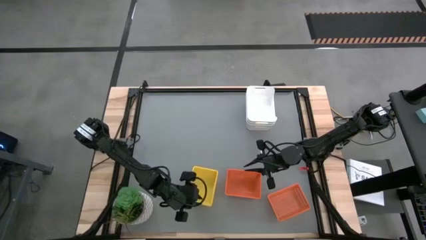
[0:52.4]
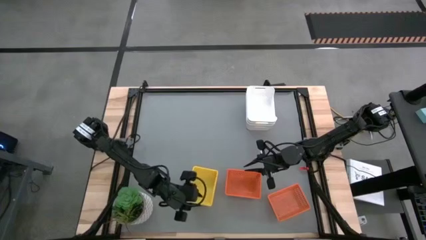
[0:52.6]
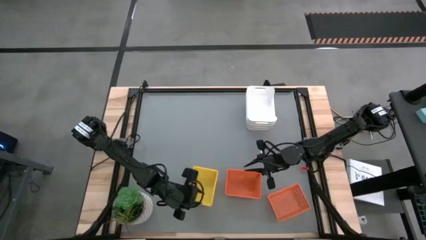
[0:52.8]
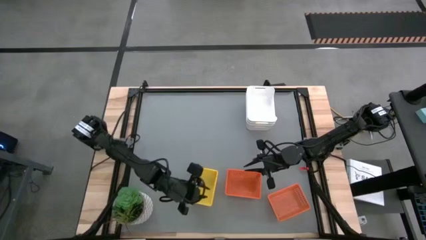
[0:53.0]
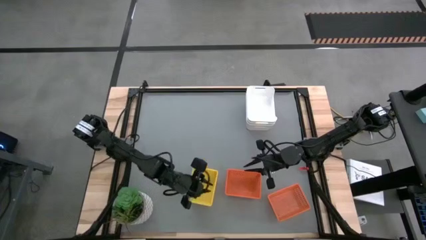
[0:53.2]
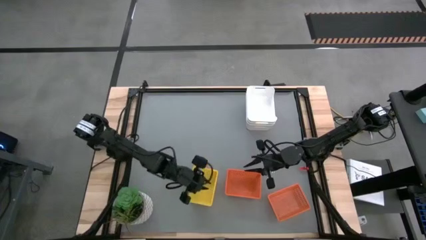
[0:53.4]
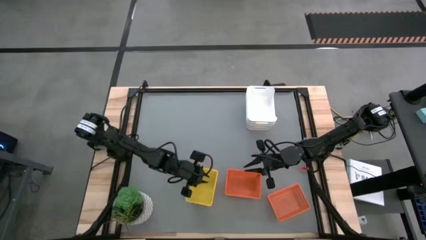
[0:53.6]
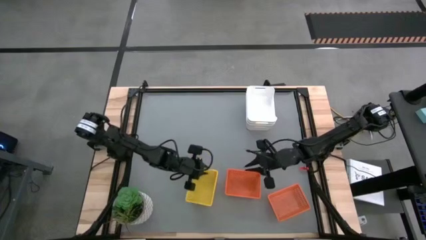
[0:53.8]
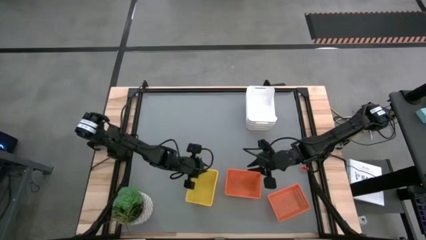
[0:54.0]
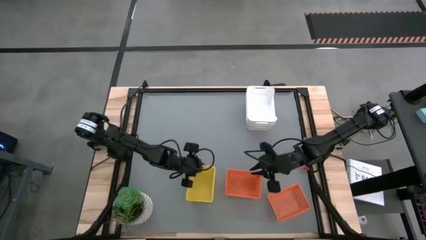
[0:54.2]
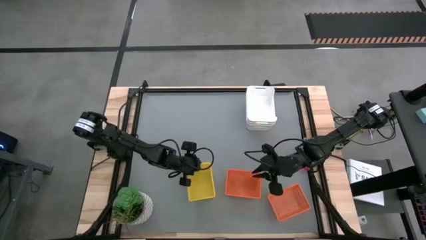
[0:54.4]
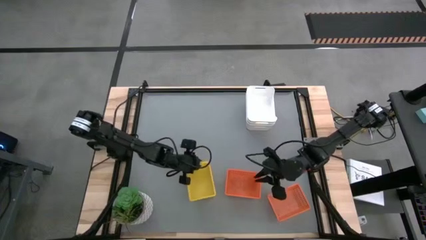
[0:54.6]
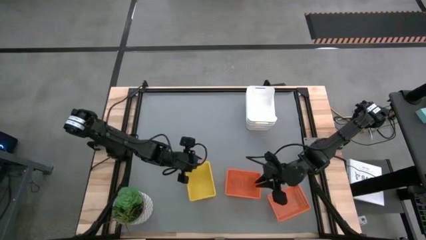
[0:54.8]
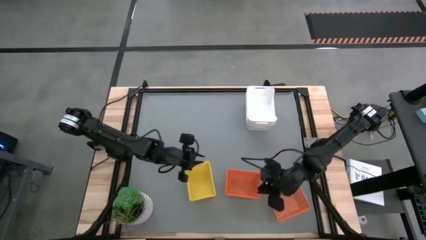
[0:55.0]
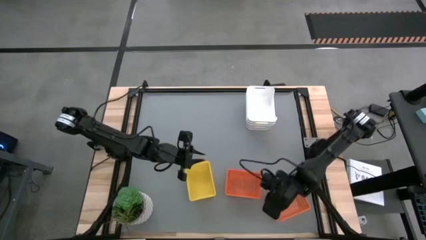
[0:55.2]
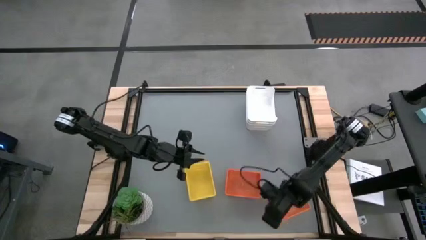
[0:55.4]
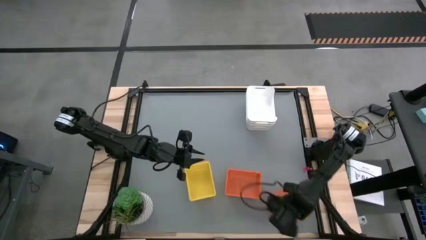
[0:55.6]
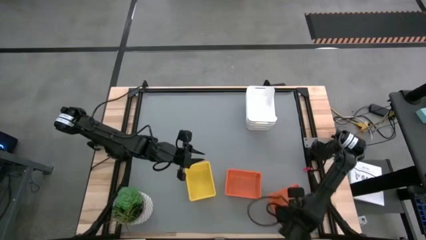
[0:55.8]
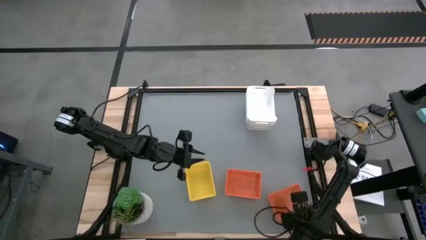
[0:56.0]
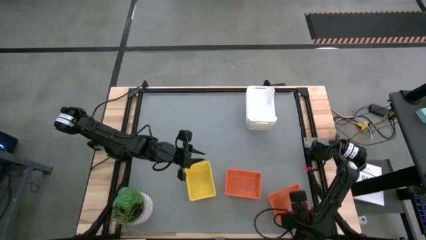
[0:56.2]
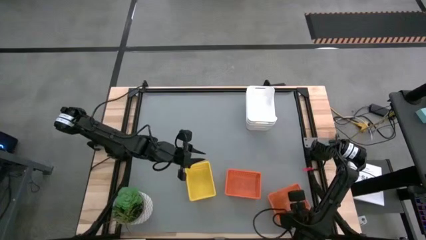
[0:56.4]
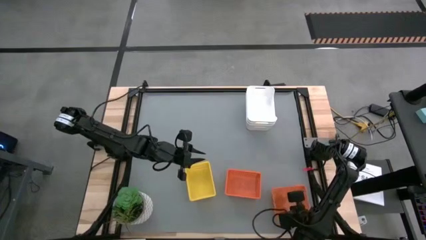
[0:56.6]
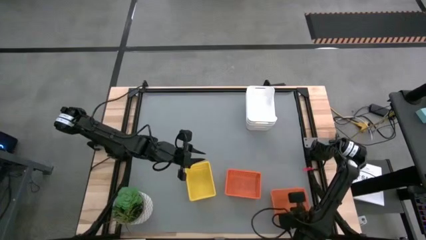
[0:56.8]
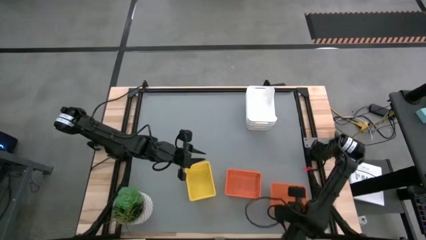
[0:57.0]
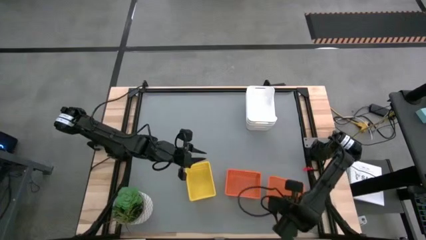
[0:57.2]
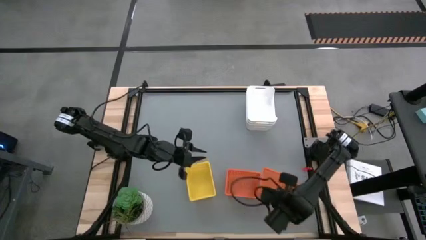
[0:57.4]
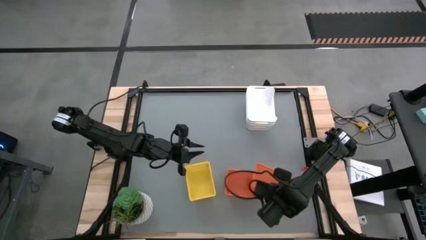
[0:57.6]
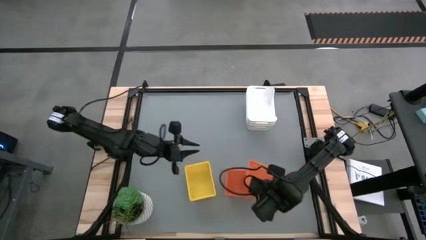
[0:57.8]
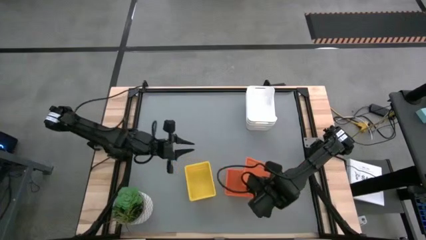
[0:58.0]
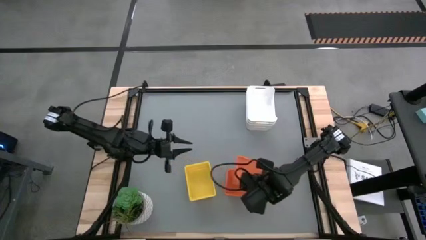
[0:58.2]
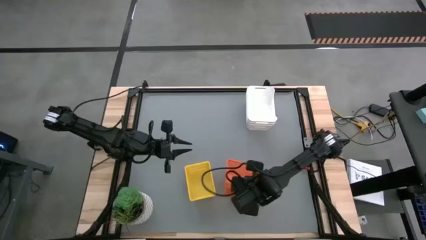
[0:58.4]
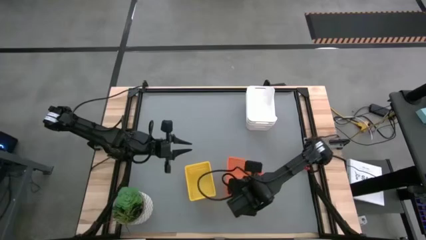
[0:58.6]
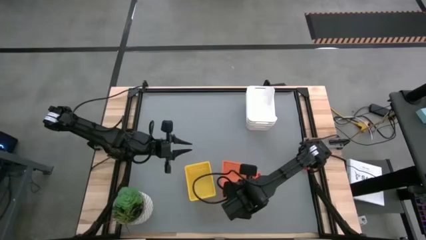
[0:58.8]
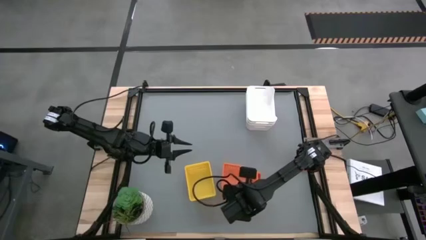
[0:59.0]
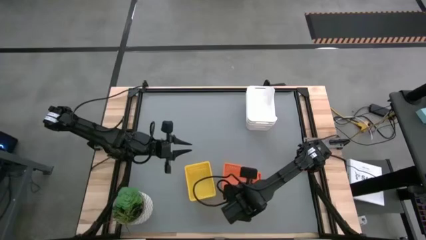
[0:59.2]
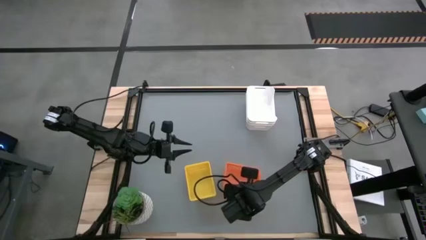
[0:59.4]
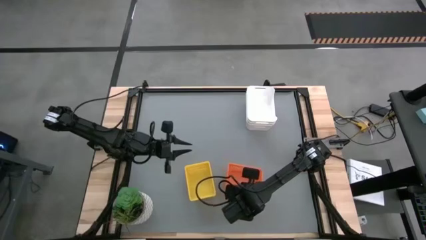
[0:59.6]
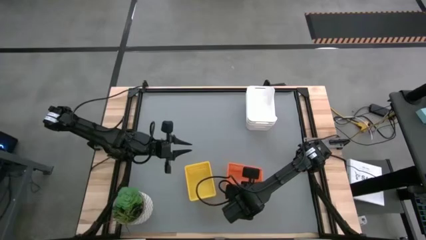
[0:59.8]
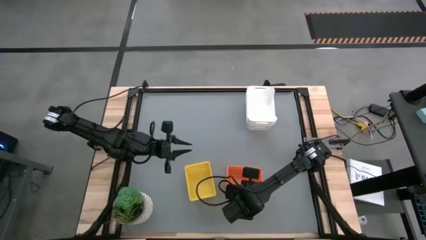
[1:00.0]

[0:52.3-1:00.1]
Stack the right orange bin on top of the left orange bin

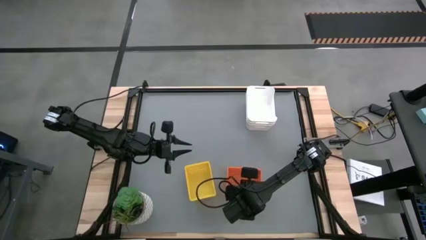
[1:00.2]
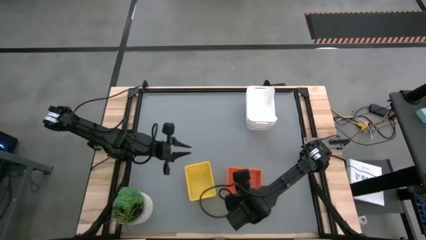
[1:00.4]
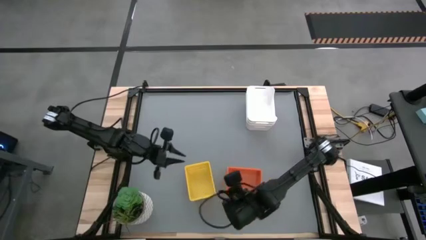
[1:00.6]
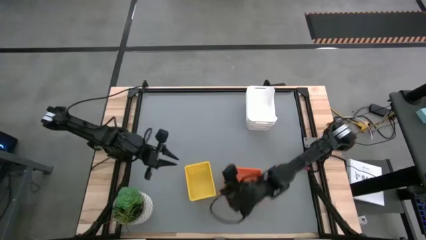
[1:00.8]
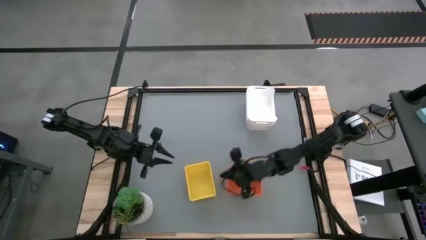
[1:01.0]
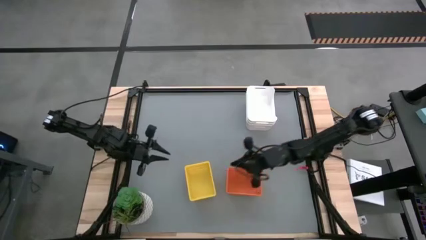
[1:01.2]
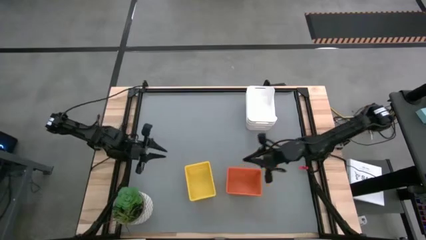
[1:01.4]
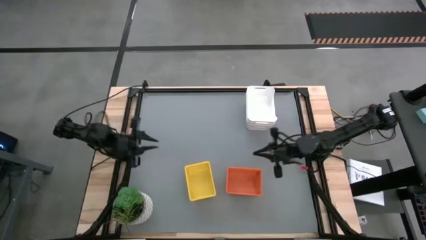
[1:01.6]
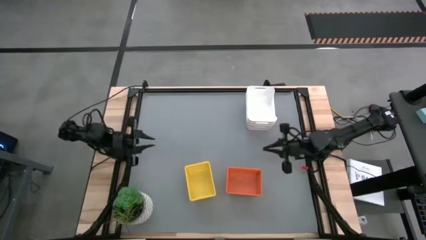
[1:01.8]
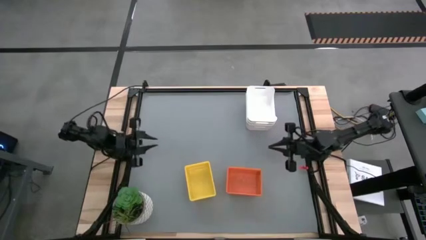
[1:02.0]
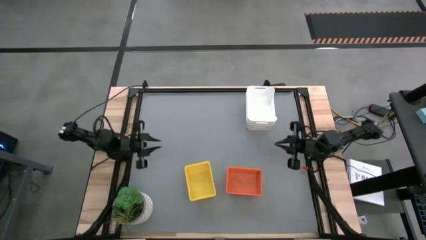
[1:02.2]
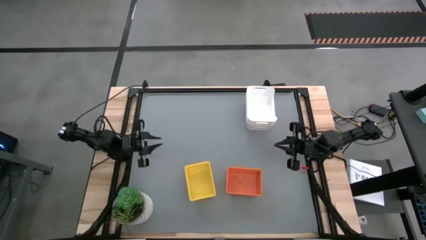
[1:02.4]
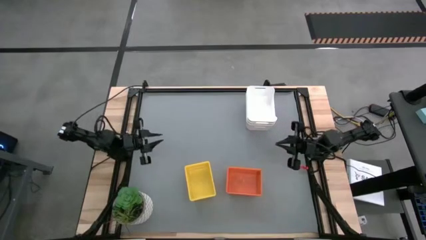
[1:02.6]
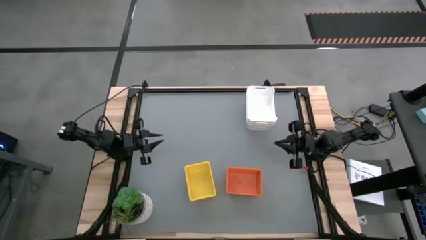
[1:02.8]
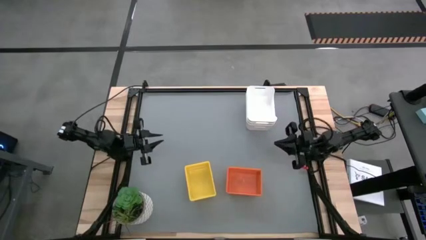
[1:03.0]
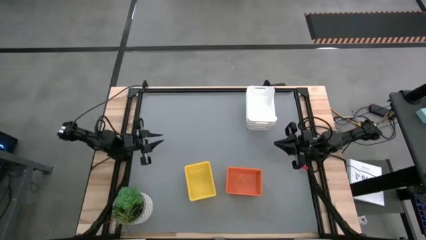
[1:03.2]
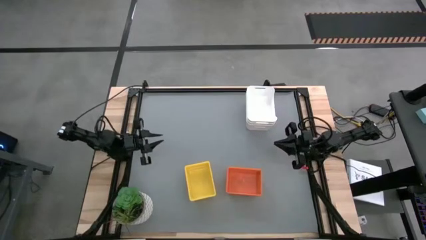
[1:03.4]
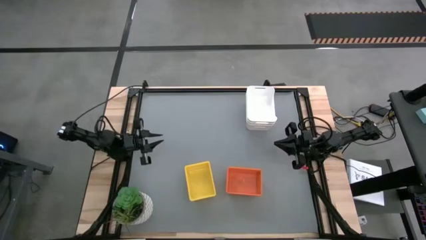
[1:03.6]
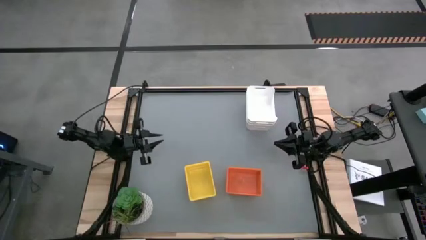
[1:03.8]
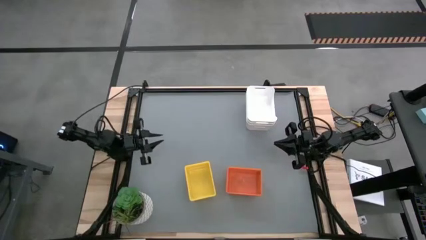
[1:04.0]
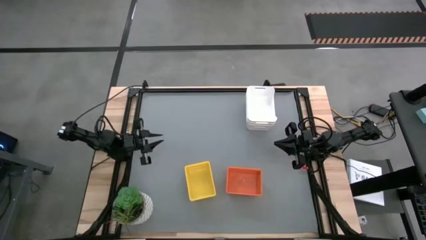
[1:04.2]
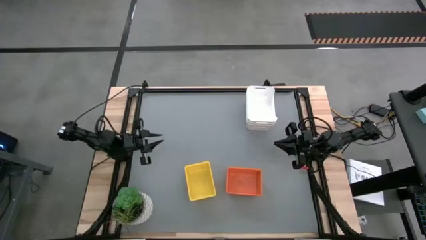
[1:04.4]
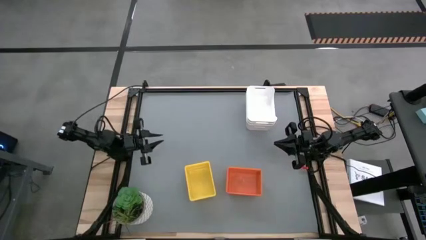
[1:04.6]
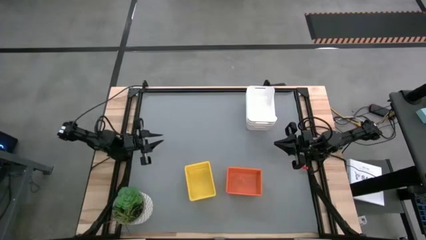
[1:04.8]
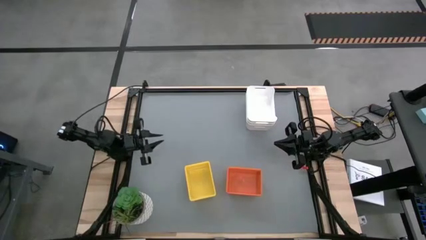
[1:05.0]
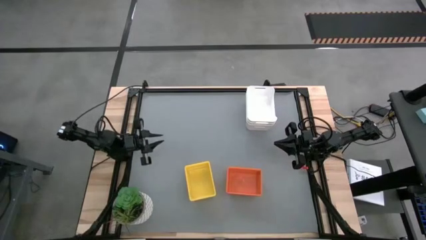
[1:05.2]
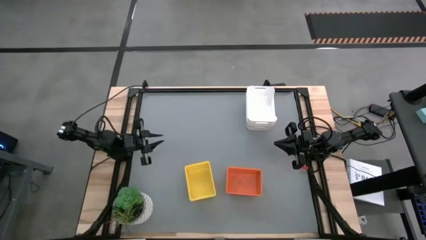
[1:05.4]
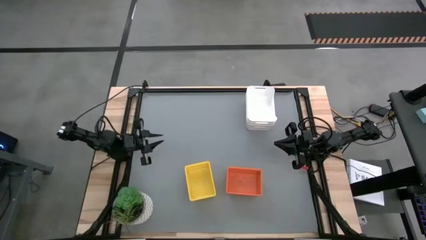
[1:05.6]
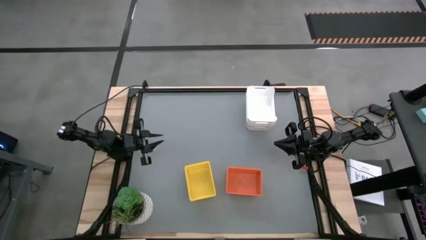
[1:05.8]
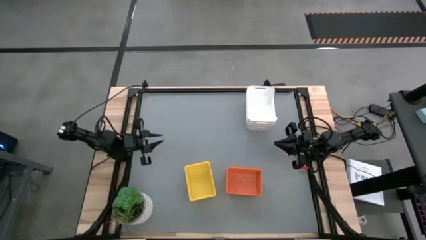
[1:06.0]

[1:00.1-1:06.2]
Return to Home Position

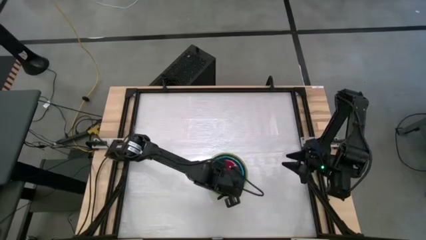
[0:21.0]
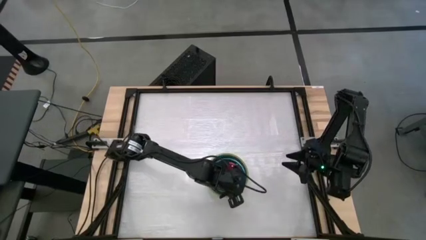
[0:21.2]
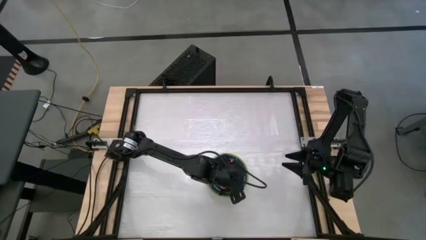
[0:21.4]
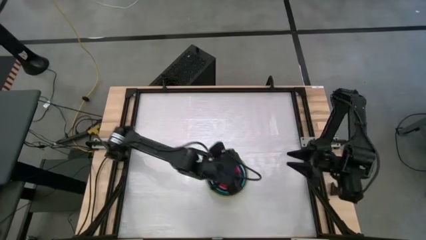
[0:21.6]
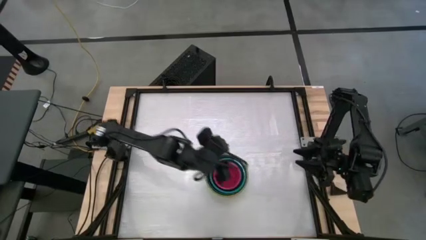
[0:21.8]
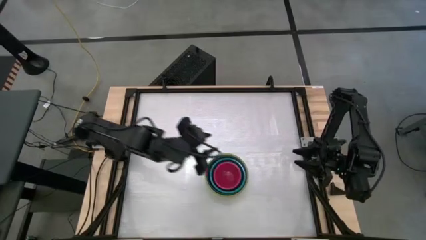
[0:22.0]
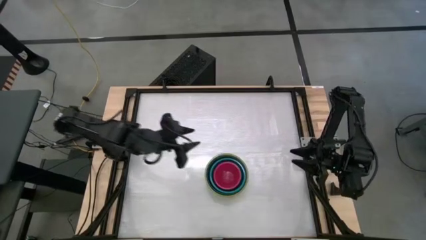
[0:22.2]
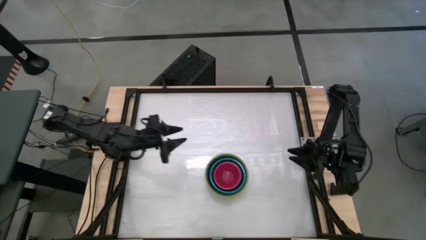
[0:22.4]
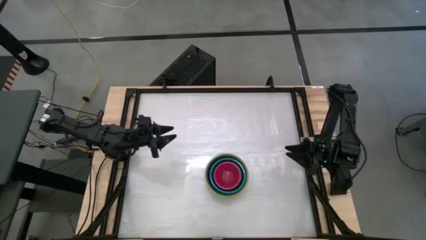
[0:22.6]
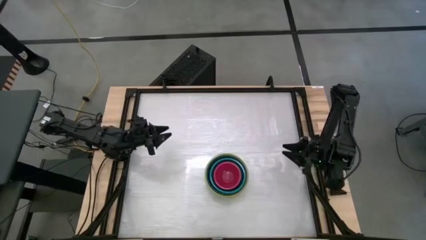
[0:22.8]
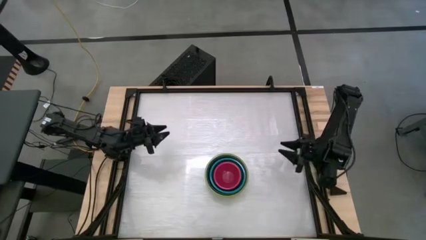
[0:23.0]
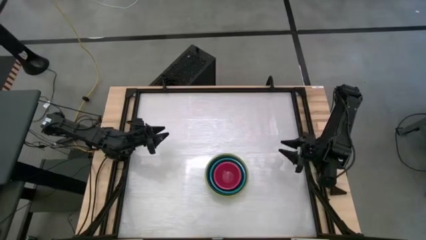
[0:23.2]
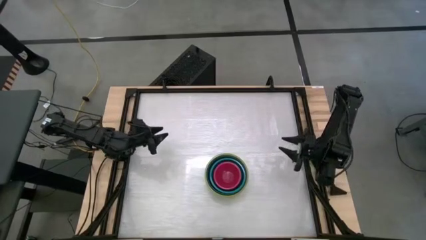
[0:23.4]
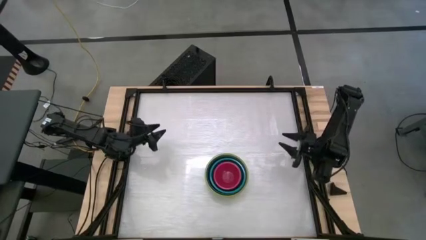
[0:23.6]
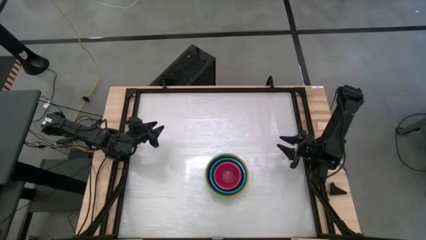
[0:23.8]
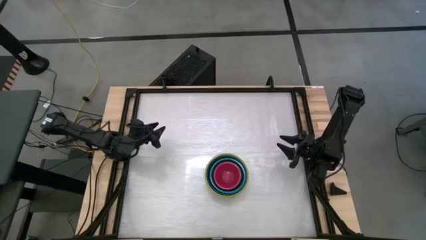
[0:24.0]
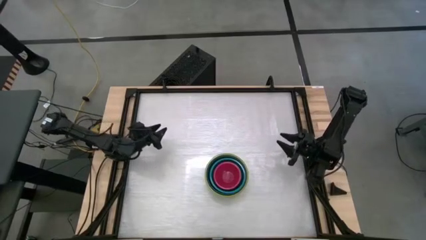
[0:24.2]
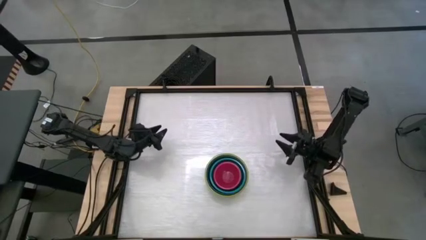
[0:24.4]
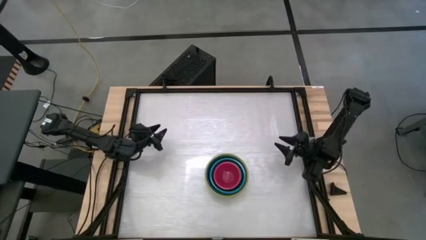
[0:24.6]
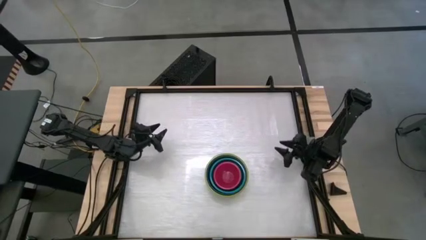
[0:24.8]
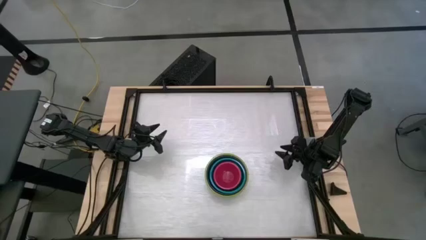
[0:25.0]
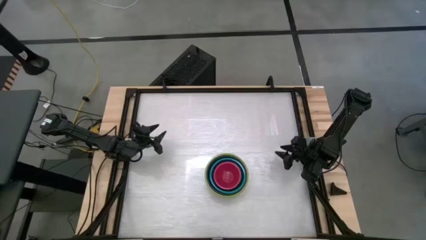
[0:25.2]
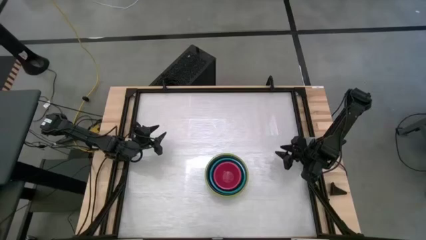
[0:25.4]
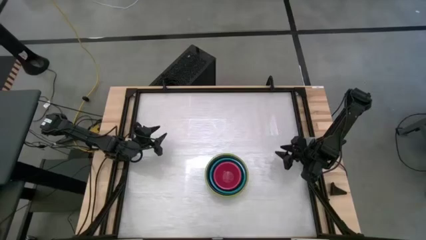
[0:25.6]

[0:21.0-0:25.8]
Return to Home Position
